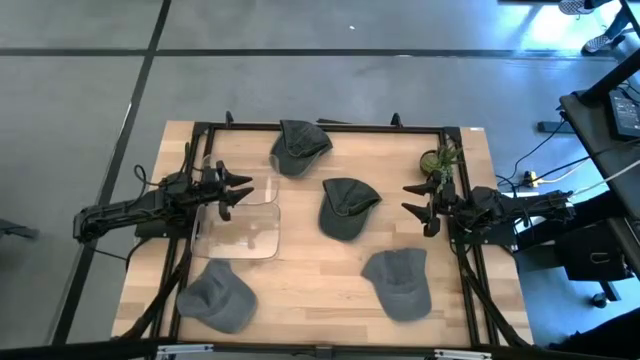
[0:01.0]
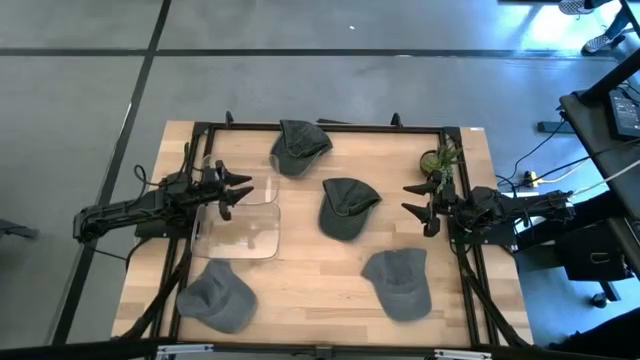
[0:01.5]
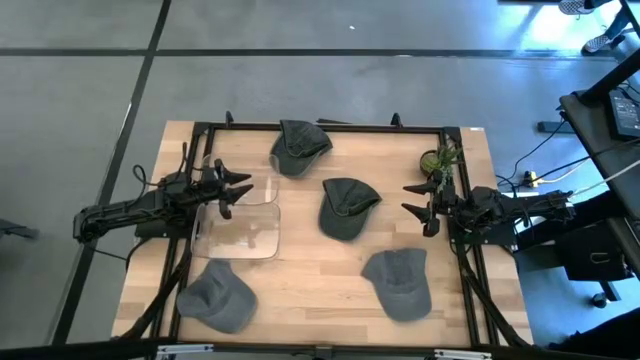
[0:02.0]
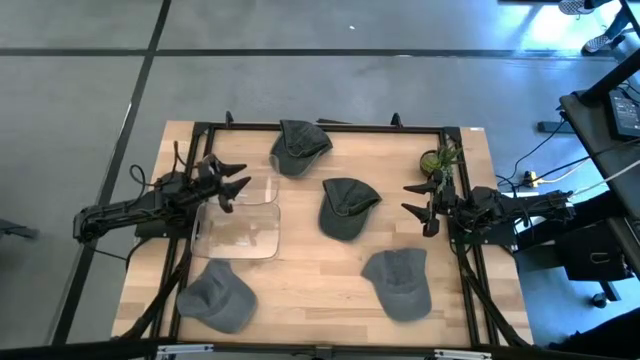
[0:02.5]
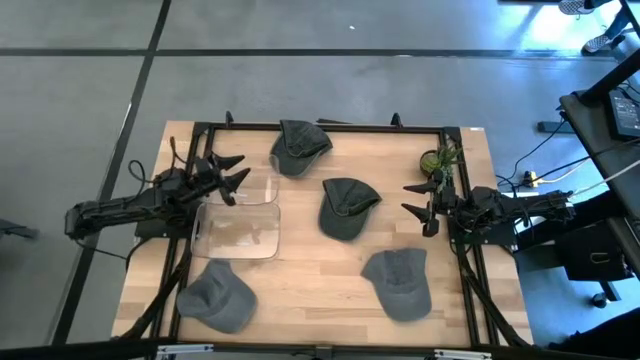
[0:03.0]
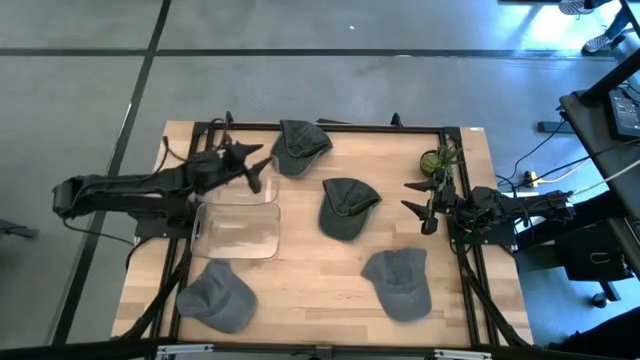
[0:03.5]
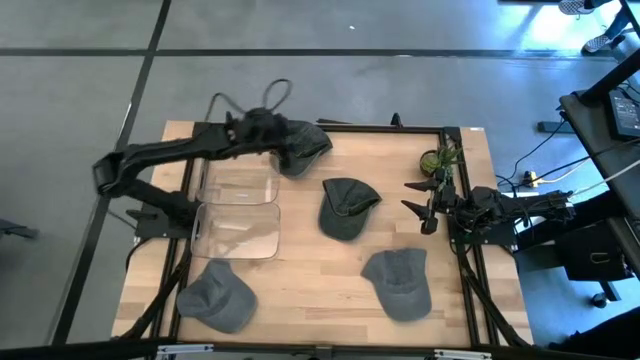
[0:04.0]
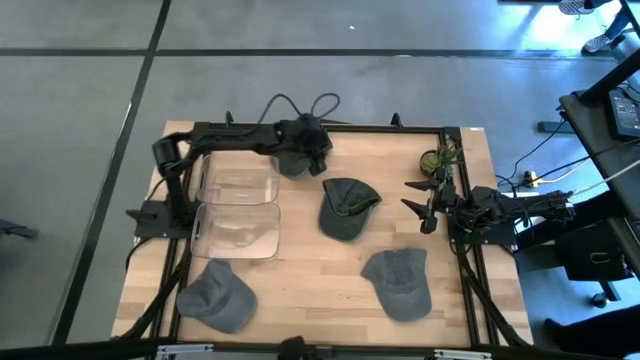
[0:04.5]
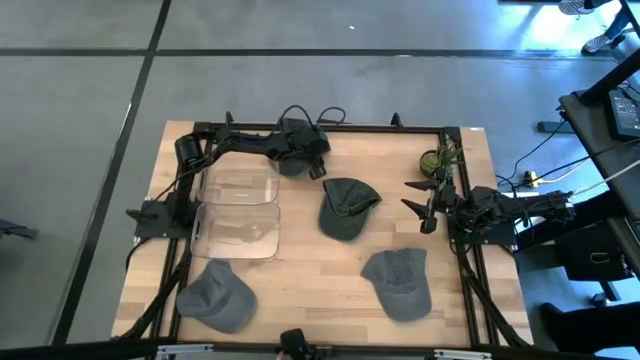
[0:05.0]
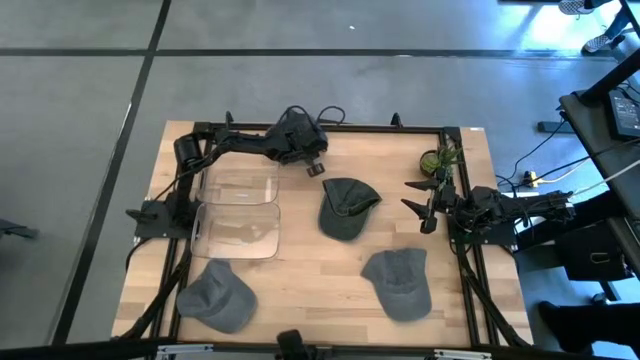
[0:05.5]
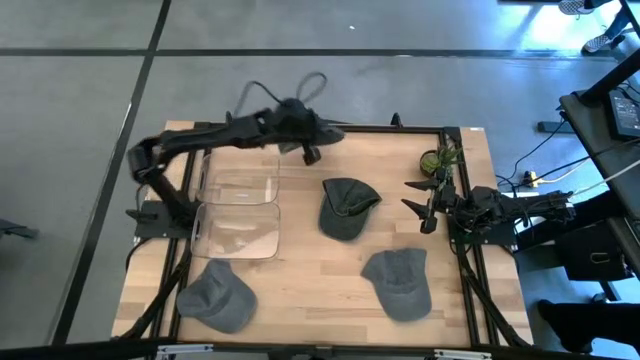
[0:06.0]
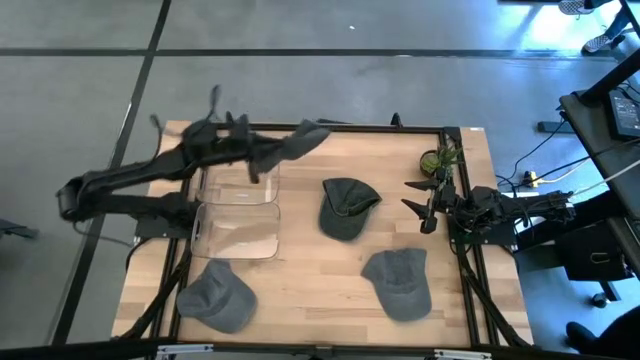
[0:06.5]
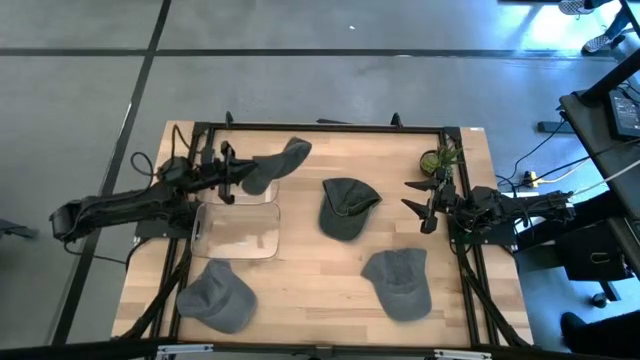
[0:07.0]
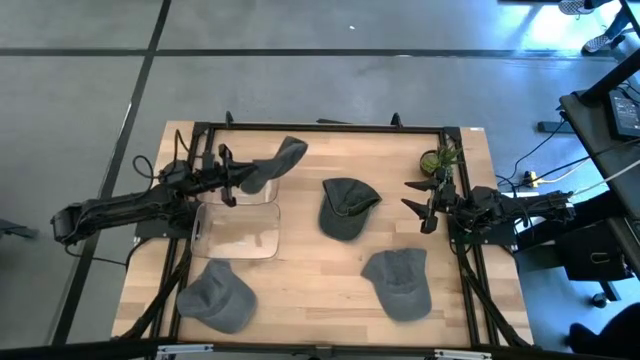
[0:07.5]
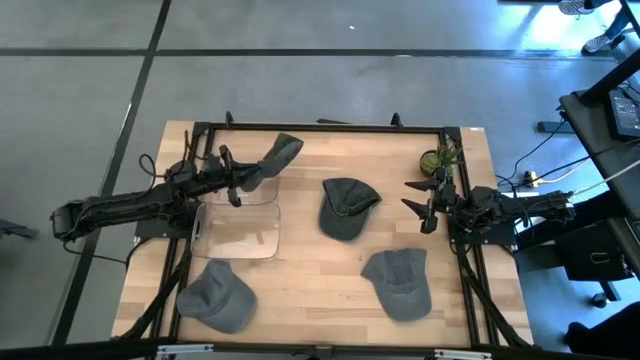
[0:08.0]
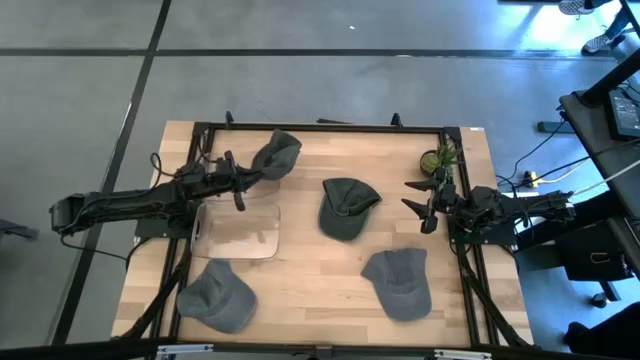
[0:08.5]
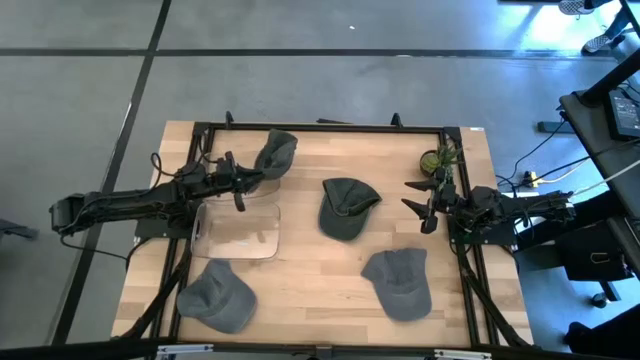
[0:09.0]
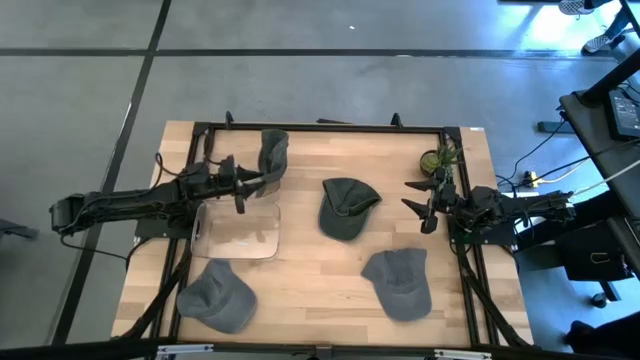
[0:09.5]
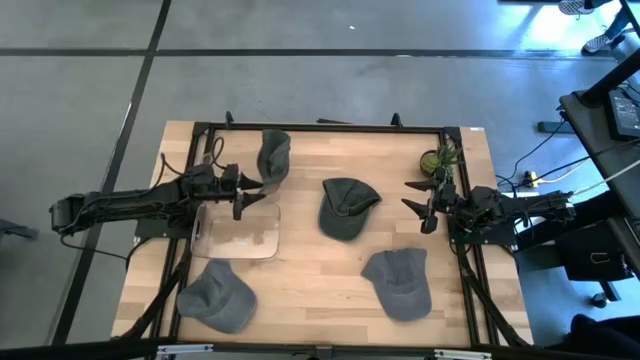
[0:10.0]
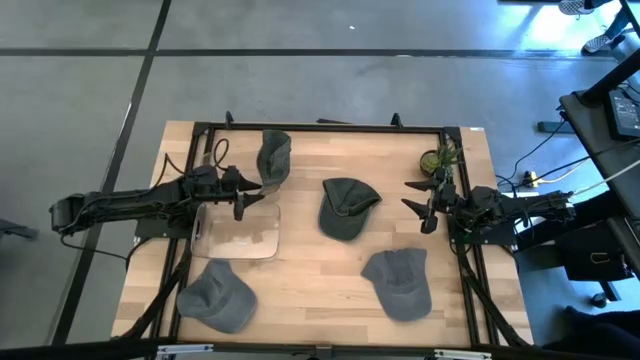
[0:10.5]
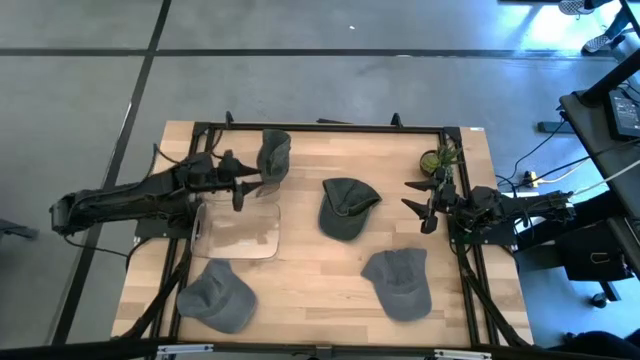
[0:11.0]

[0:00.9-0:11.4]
Task: Pick & Place hat
Put the top black cap into the top transparent bin

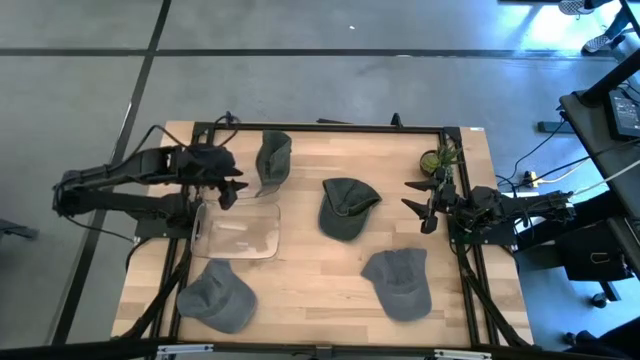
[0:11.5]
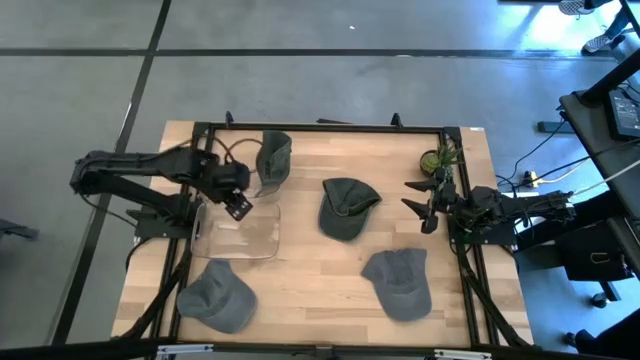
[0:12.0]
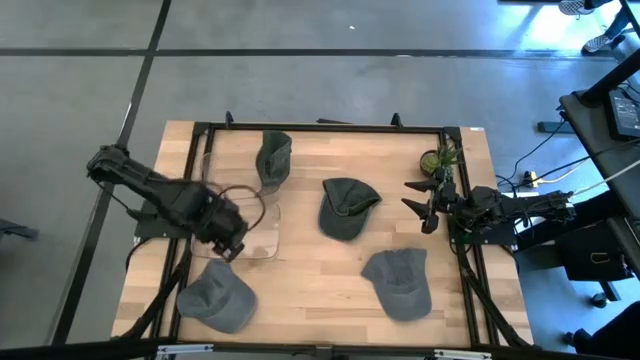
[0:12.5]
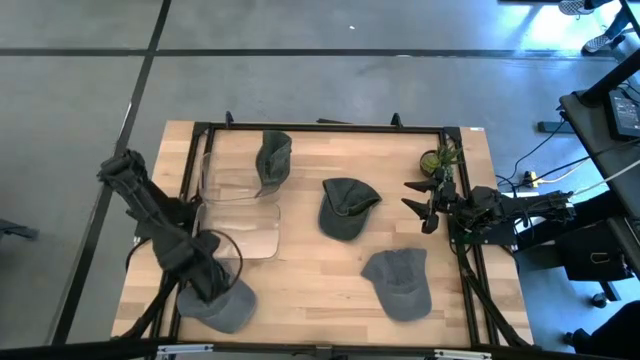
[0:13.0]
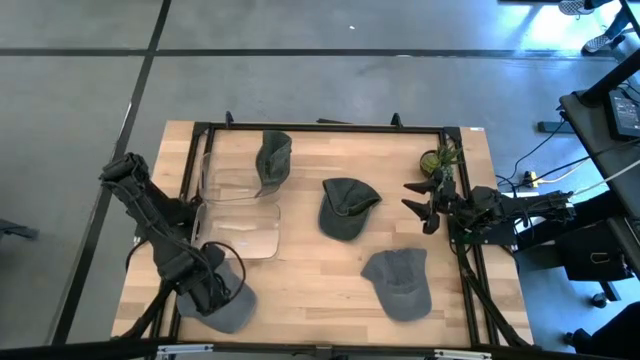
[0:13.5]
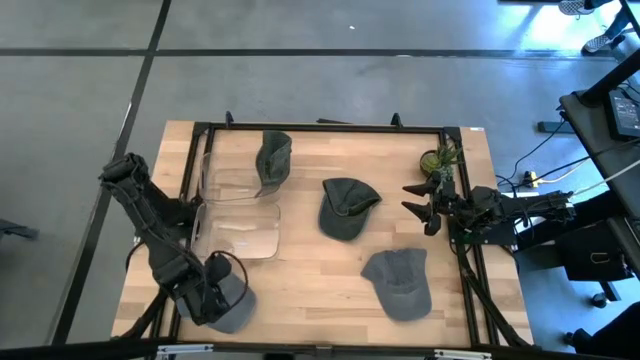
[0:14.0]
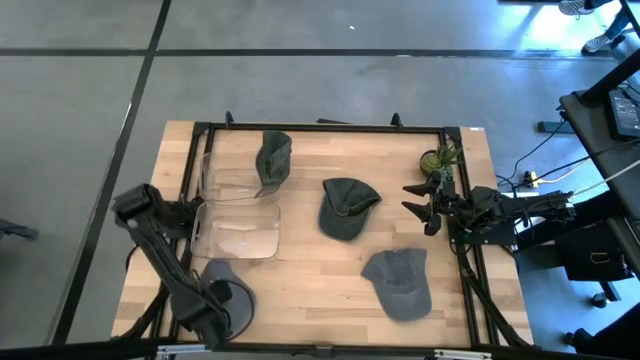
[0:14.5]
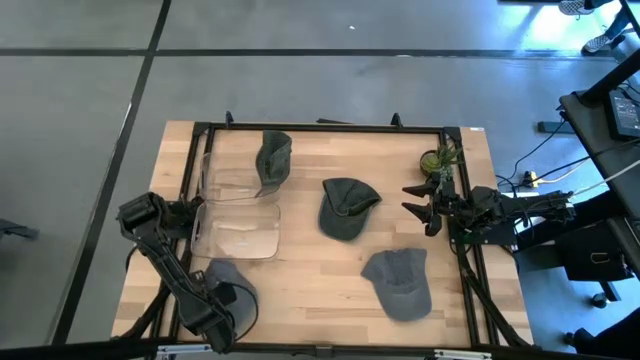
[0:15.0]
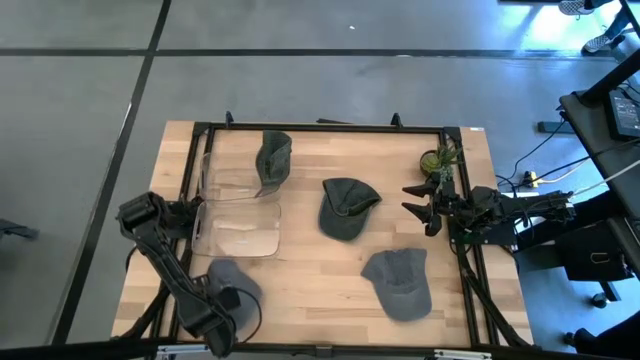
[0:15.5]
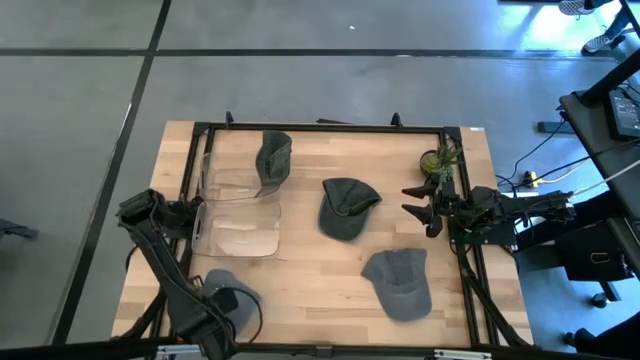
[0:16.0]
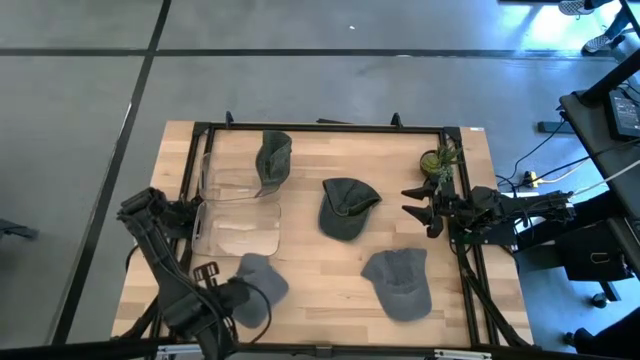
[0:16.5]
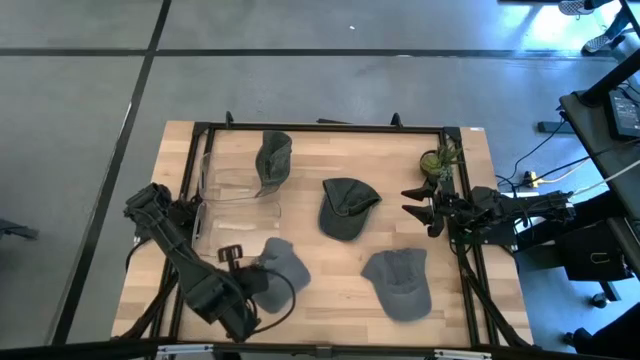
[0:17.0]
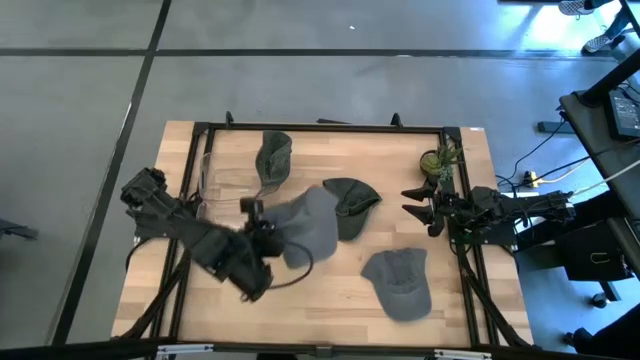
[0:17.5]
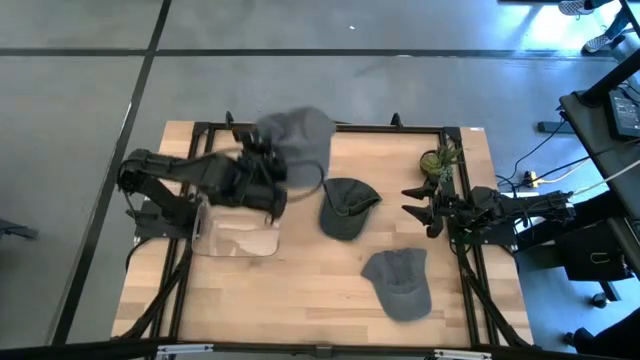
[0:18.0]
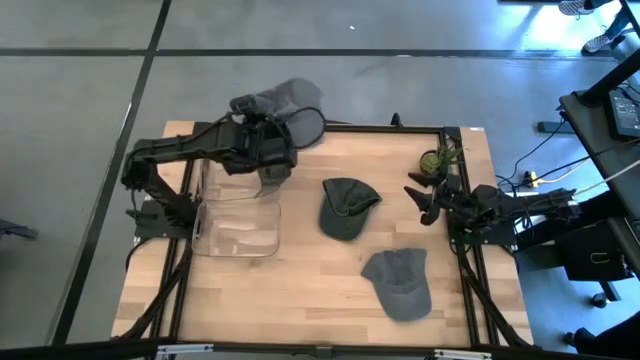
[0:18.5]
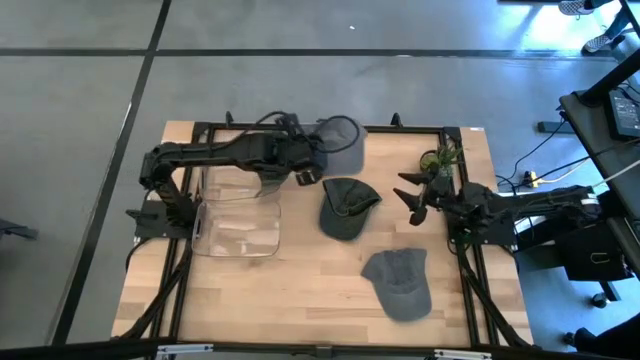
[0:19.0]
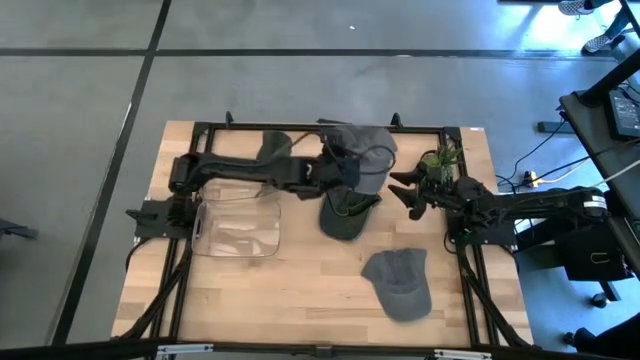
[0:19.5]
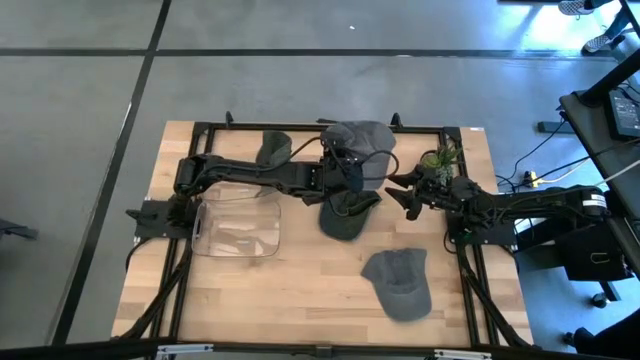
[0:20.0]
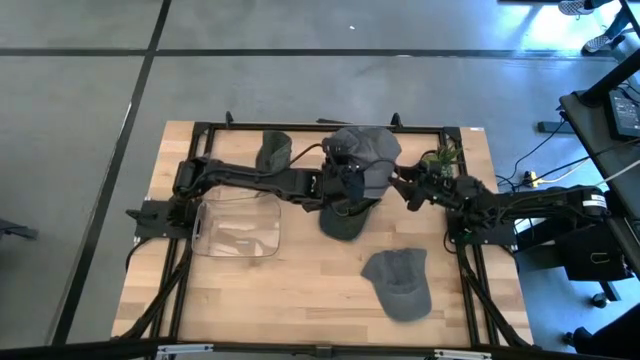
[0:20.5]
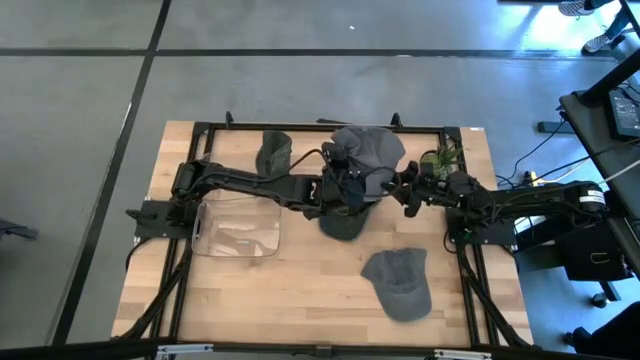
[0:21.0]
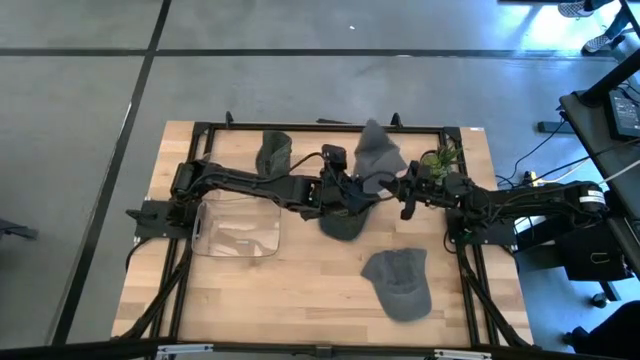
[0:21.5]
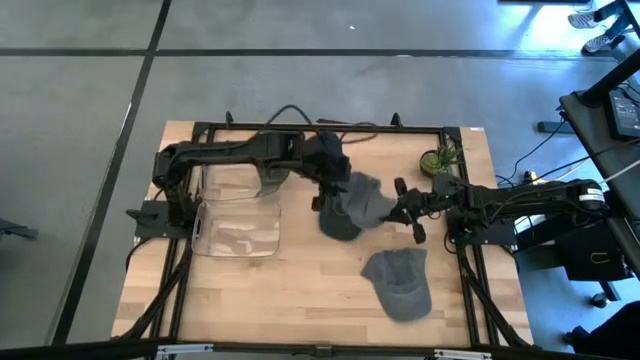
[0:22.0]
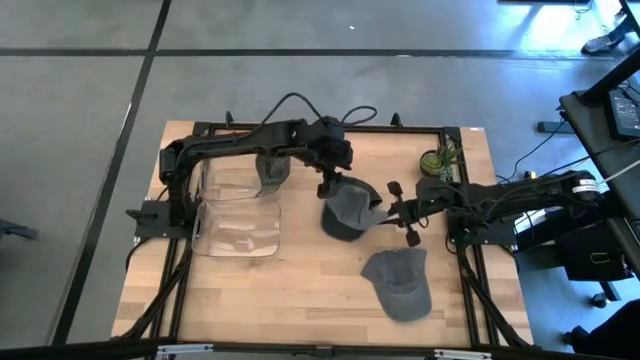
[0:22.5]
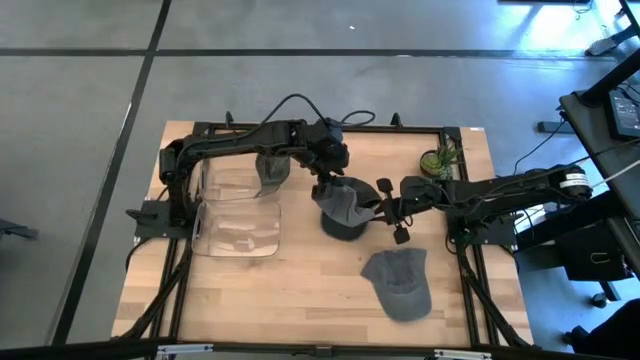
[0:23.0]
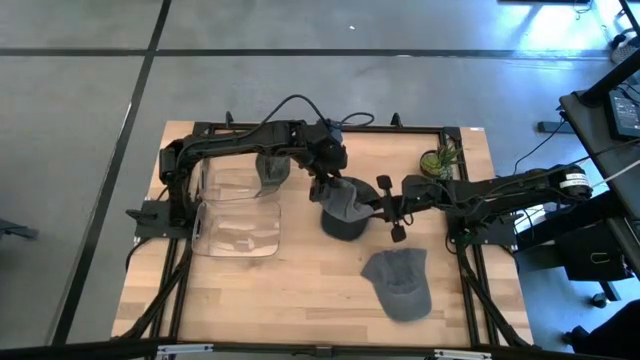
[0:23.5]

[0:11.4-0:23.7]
Put the left gray cap into the bottom transparent bin
